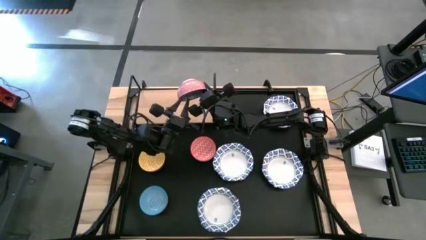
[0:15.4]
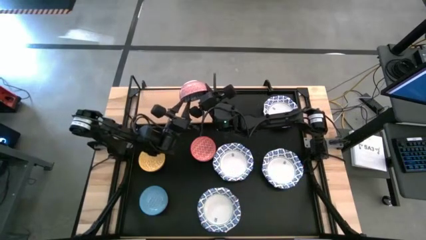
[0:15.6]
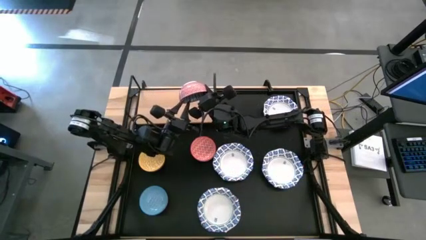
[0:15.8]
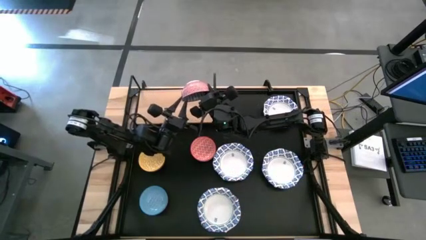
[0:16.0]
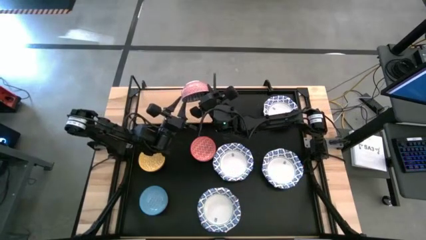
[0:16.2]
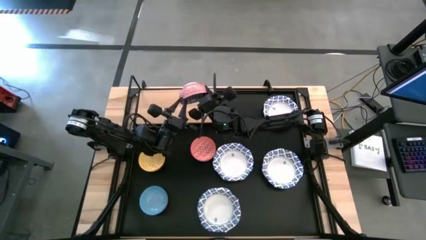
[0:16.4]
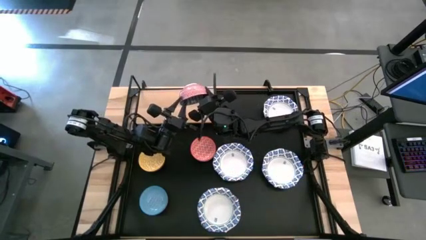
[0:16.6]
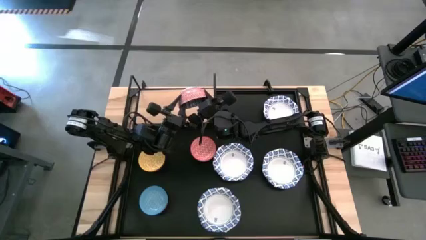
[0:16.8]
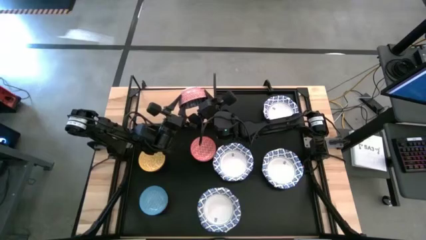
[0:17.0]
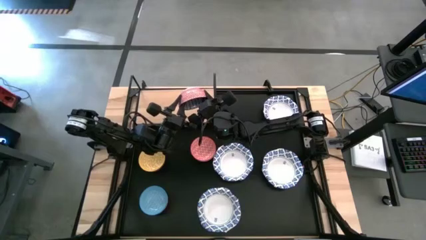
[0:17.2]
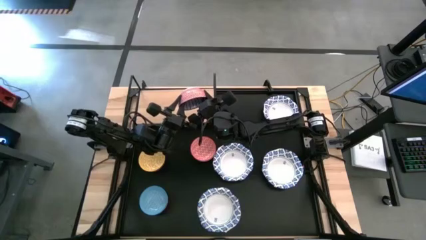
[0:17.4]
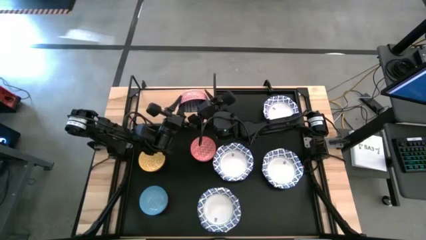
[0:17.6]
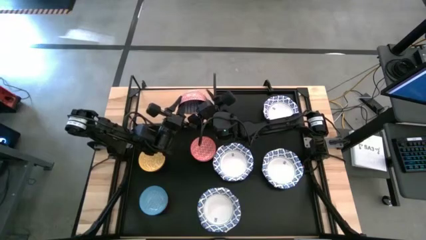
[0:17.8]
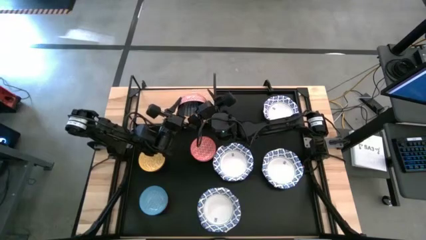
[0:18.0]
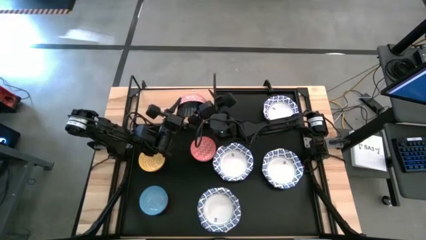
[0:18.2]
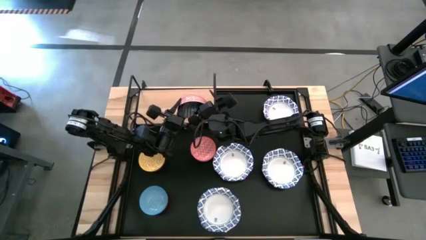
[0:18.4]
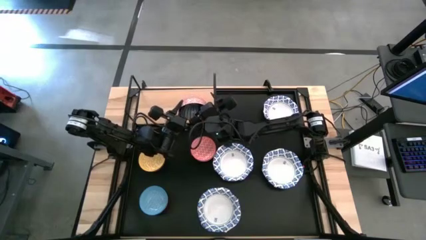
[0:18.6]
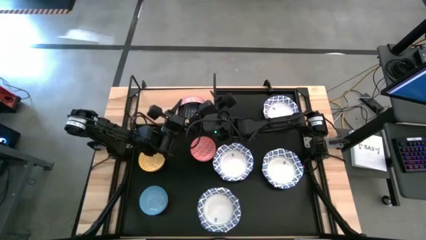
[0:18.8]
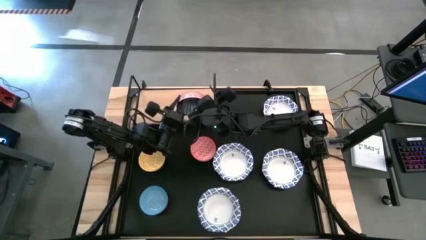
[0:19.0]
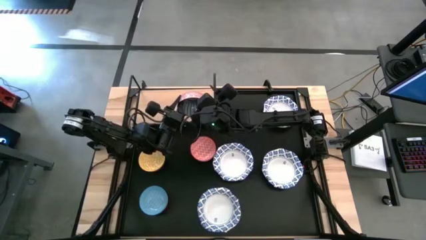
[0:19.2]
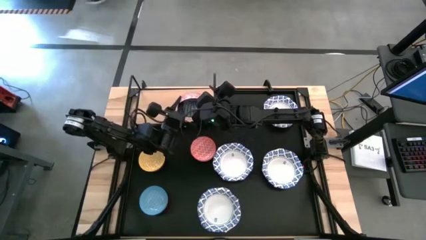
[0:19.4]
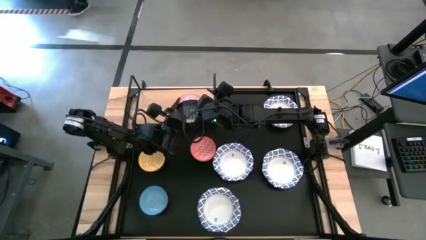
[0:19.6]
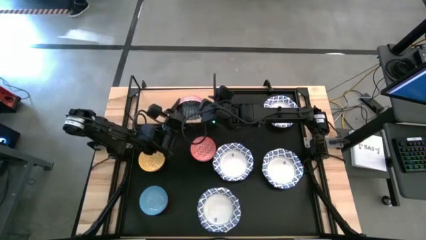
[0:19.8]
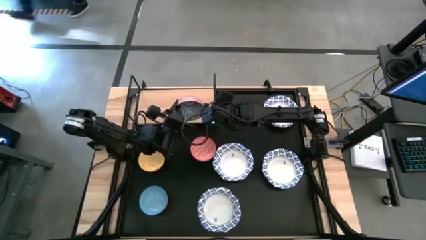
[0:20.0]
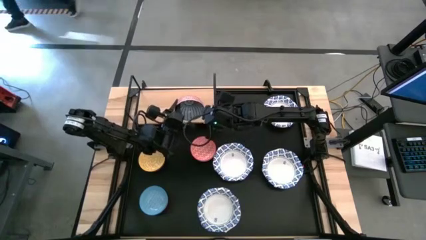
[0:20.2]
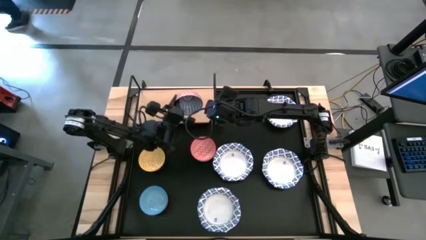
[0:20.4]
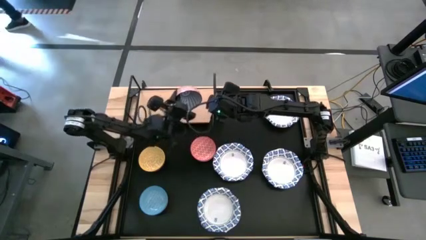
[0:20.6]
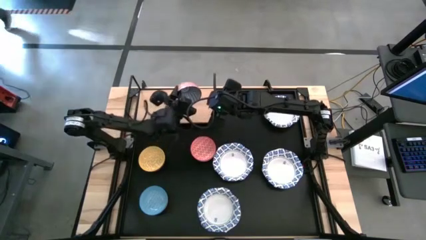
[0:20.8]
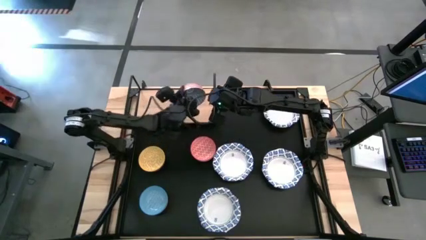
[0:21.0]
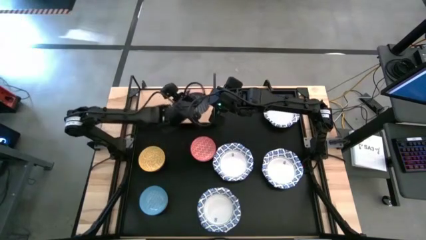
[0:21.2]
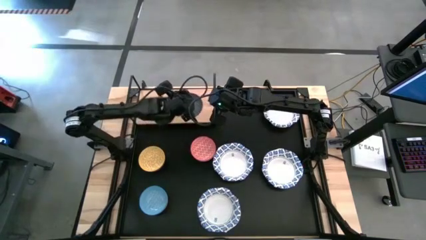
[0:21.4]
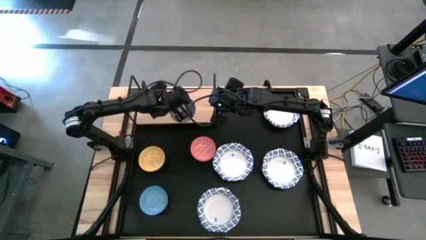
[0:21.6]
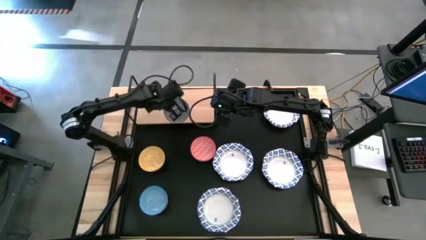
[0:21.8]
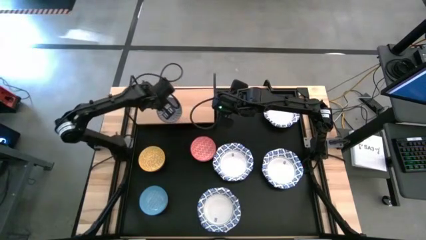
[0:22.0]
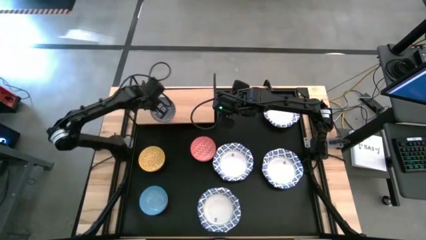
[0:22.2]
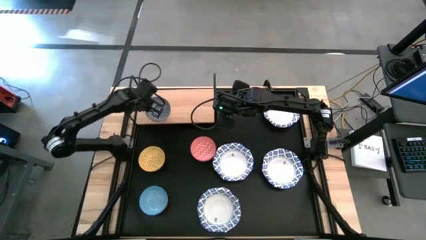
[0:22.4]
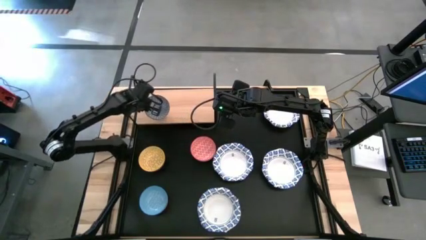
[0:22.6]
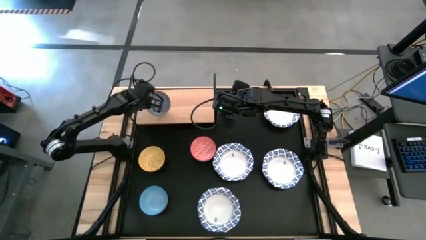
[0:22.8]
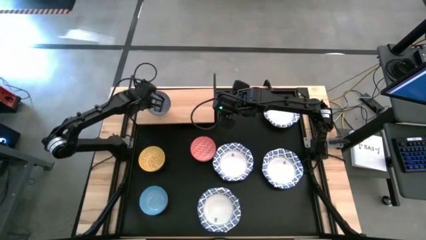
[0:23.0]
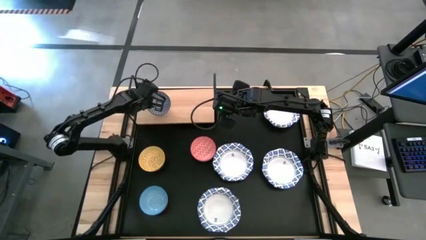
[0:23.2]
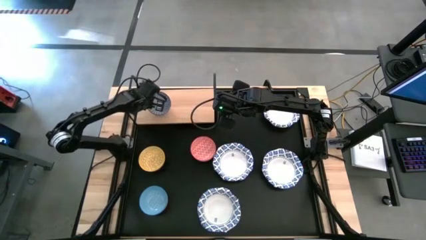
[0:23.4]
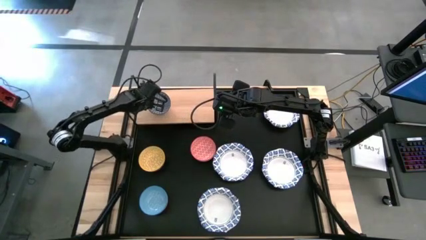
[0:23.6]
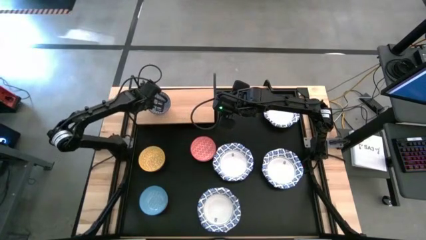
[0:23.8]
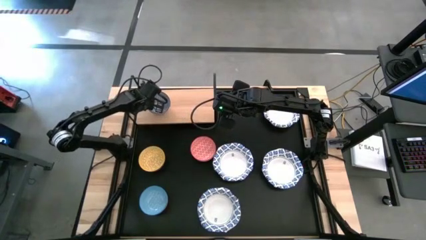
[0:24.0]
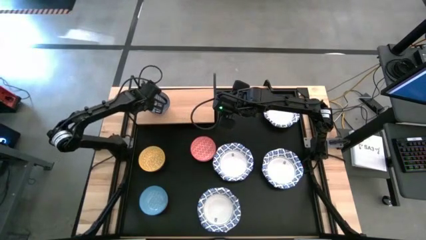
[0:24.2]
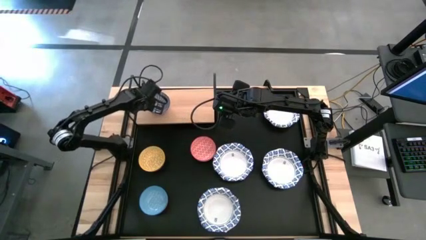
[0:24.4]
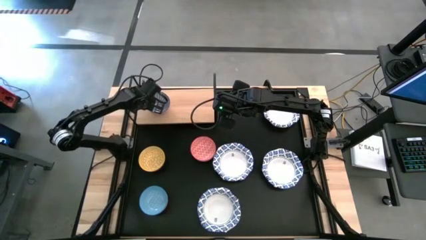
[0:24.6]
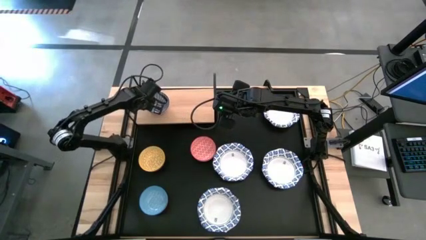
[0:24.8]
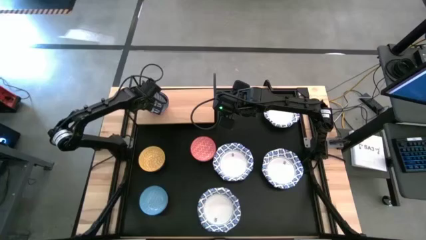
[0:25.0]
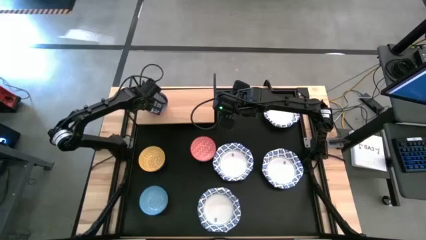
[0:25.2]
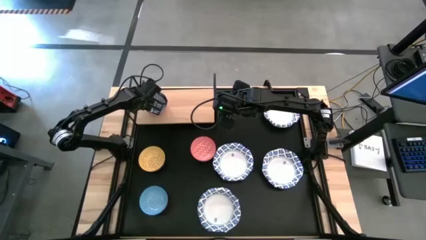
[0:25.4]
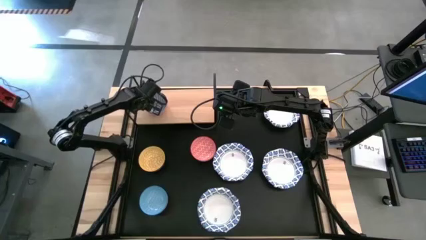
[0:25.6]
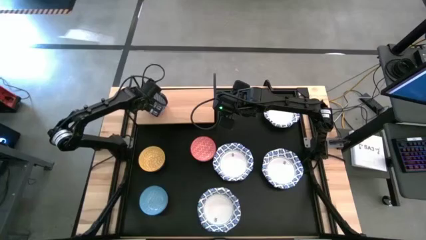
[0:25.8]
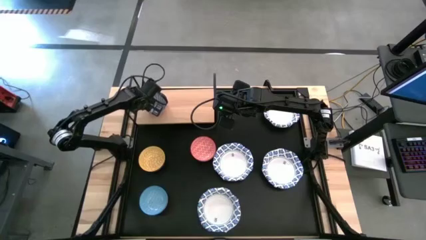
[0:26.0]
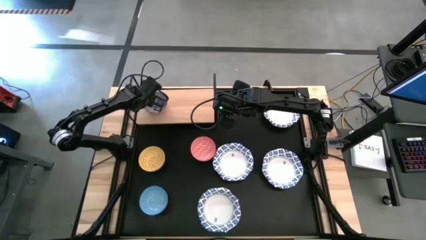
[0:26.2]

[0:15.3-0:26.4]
Task: Place and stack bowls onto a shelf
Put the blue bowl on the shelf

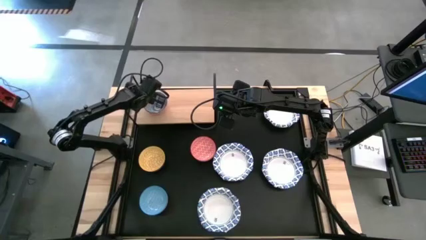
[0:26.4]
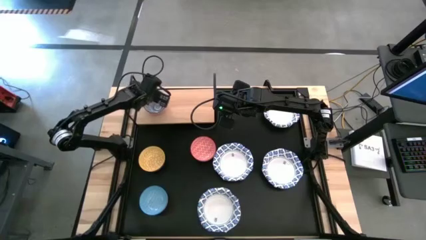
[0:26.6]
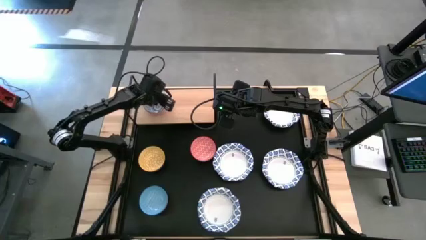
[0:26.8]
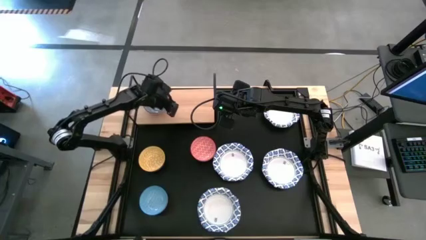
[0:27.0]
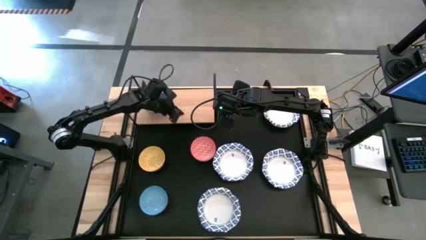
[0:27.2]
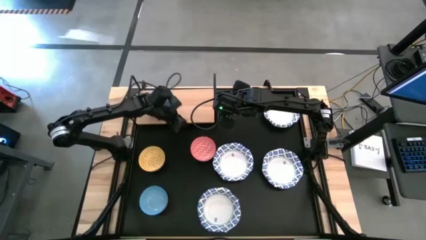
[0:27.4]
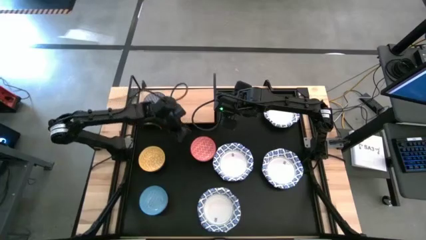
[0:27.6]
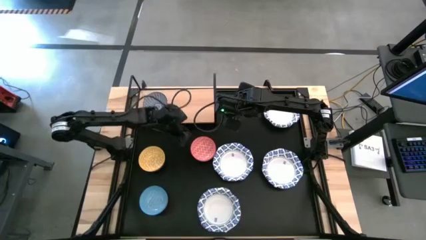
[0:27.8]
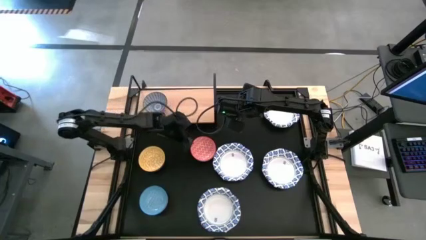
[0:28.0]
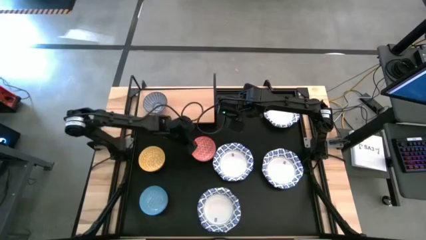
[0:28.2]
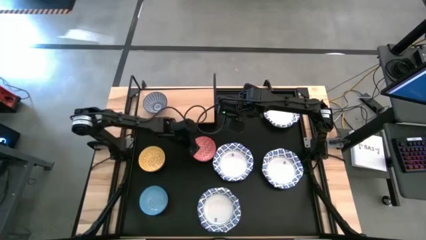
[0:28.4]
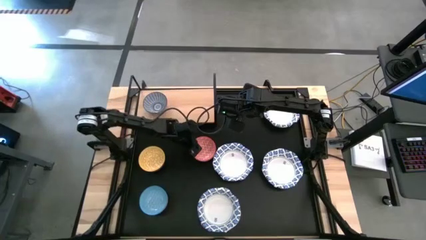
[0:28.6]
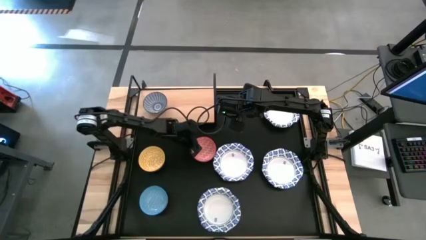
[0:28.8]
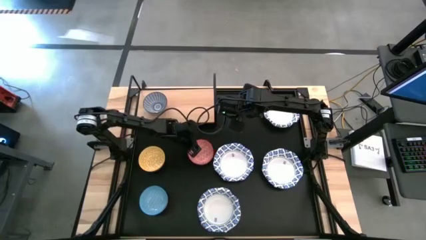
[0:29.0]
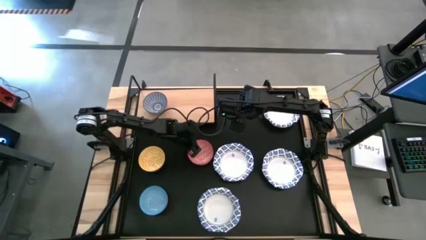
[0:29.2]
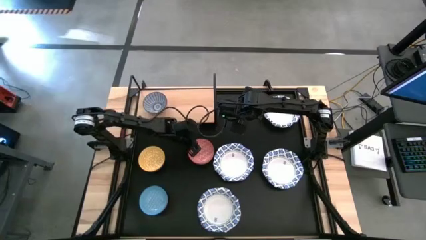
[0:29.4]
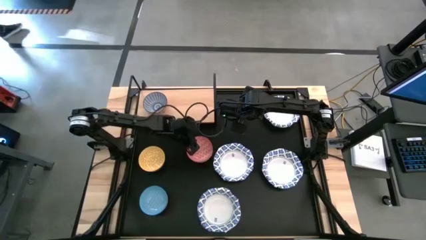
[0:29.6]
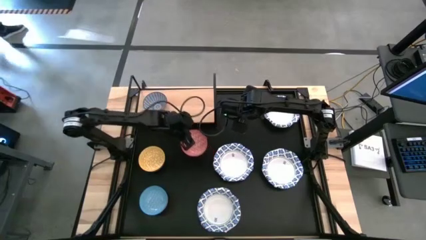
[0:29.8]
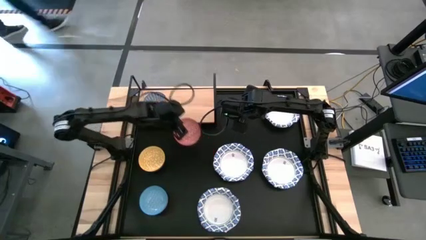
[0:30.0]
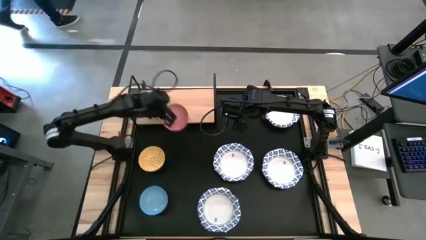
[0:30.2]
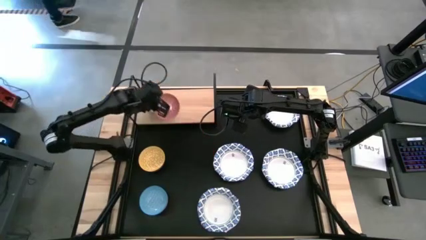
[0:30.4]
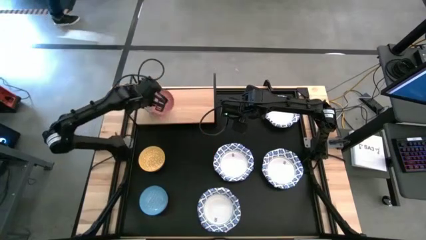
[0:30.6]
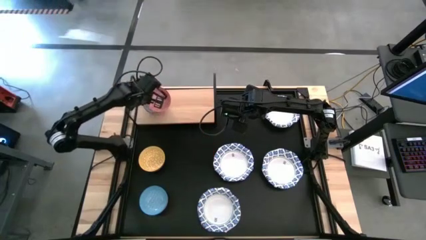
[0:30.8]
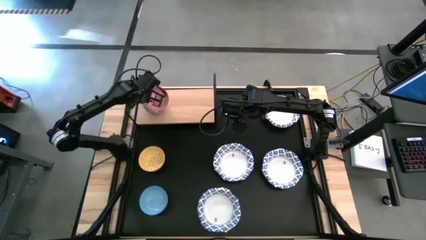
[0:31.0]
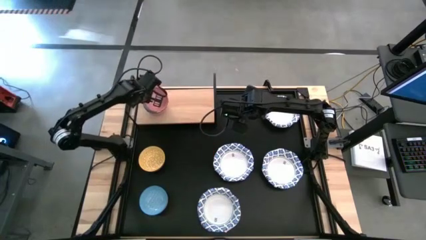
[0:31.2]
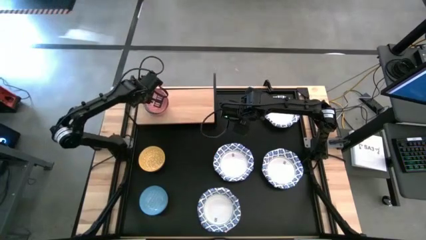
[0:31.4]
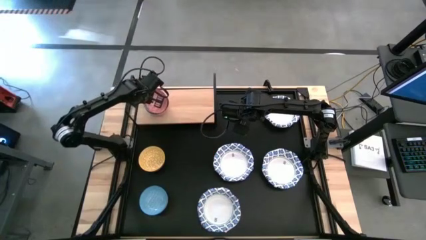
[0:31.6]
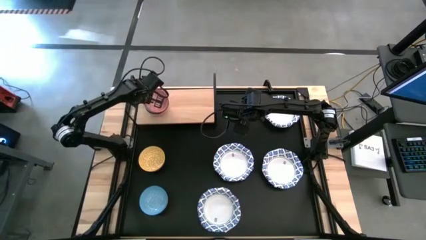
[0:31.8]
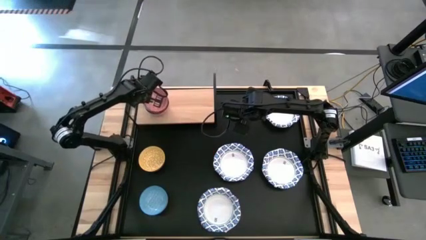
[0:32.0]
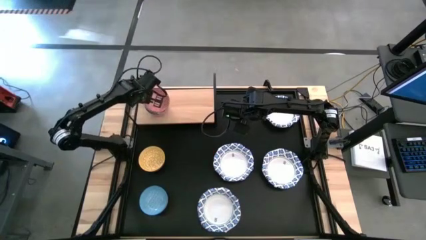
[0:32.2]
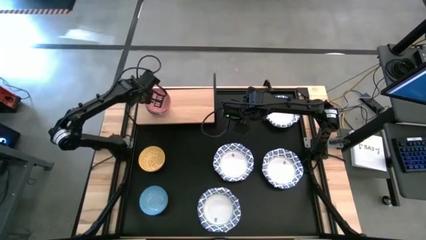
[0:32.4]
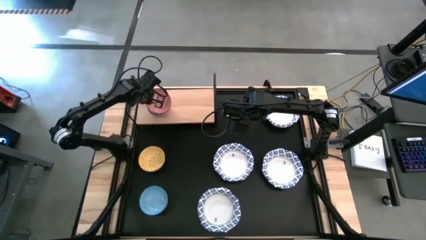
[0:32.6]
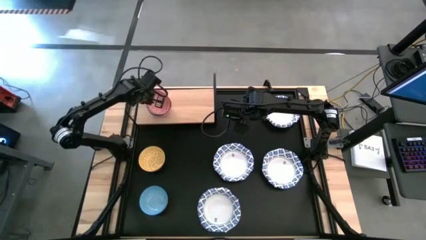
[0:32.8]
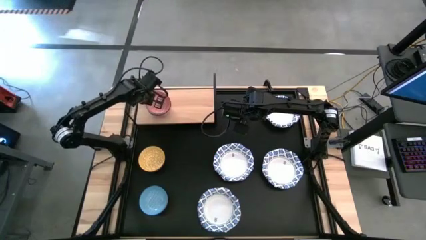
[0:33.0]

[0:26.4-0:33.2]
Stack the orange bowl on top of the blue bowl on the shelf
